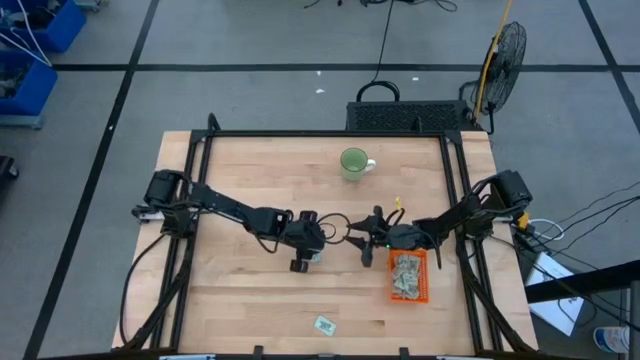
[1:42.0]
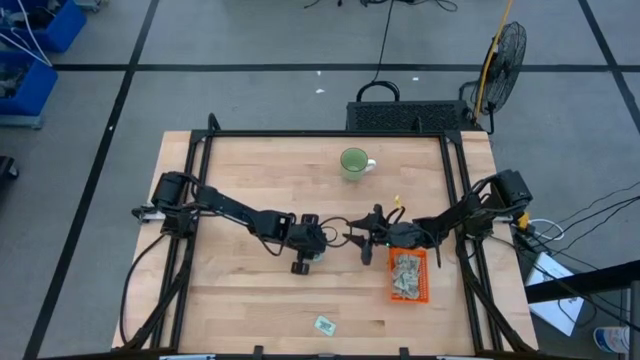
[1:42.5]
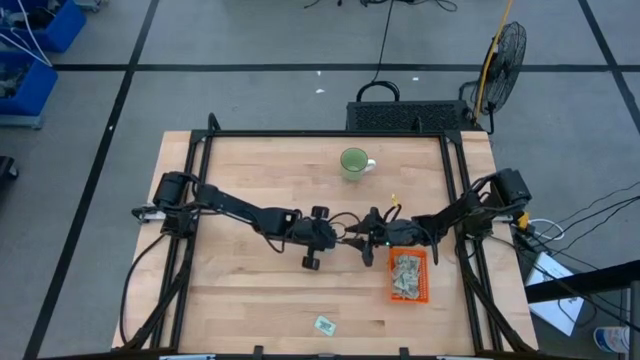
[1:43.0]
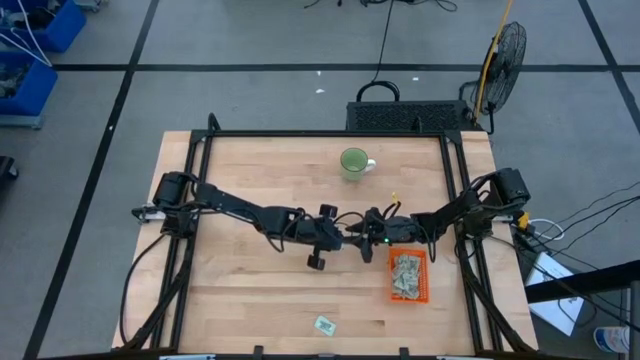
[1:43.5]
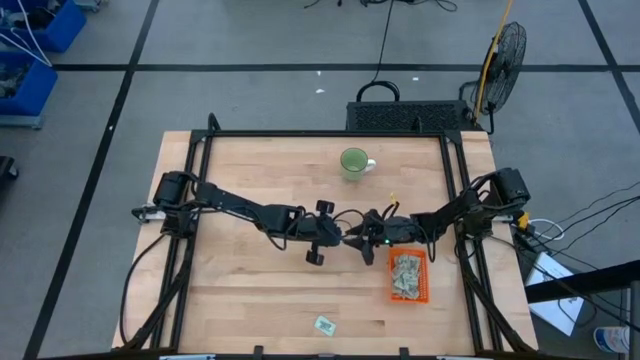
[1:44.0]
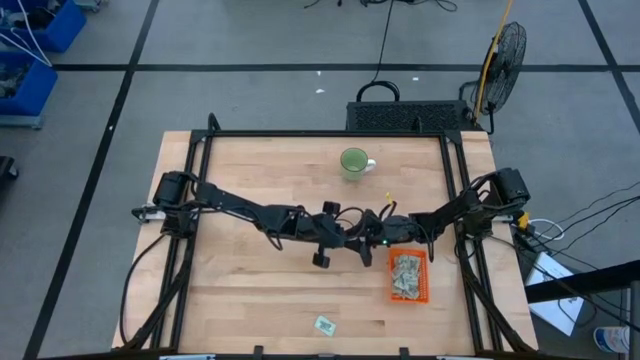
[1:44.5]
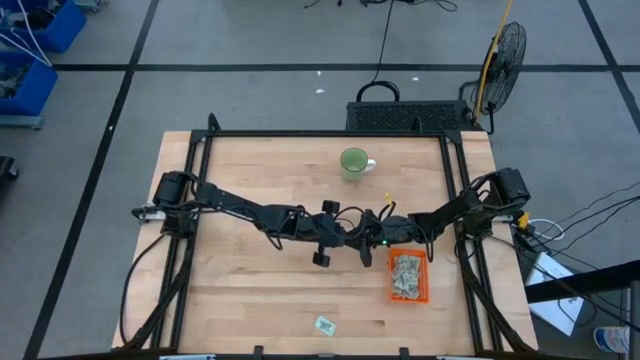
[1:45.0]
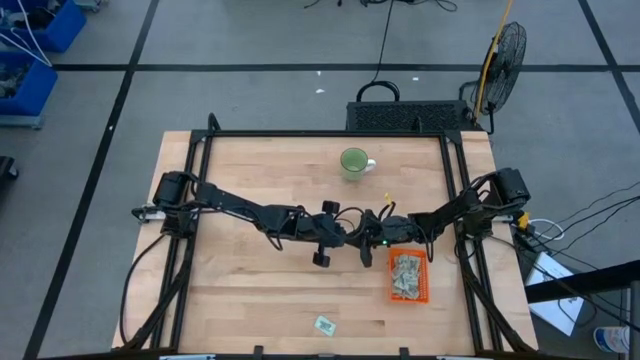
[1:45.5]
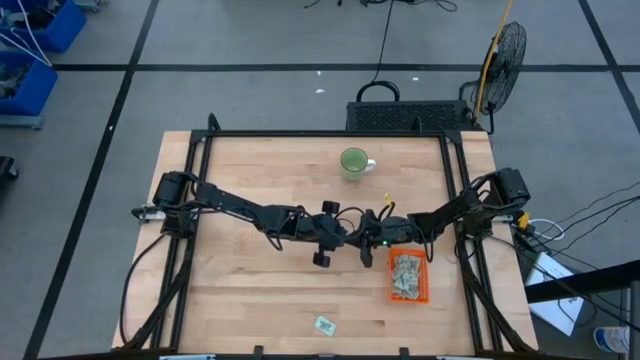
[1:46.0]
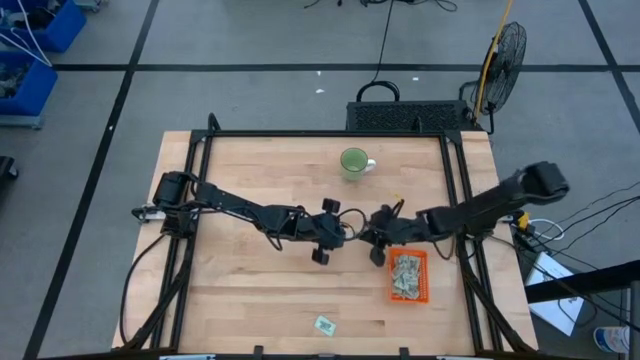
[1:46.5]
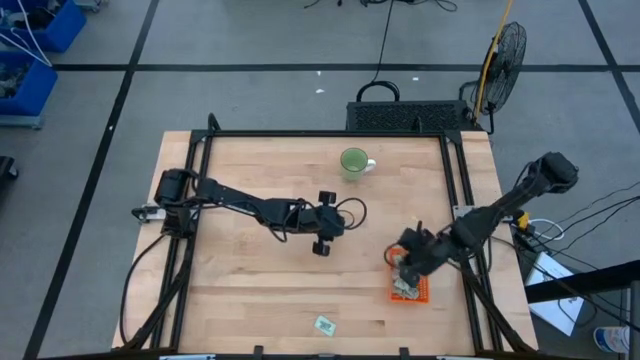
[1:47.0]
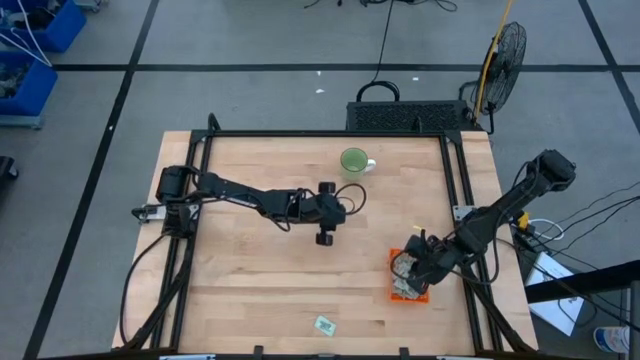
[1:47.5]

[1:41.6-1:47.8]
Task: Pick and place Stevia / Truvia into bins
Put the top stevia packet into the orange bin

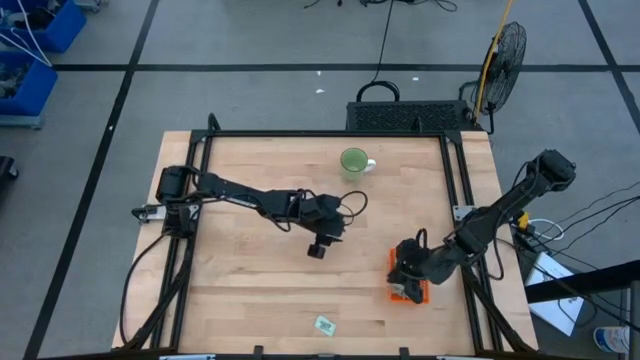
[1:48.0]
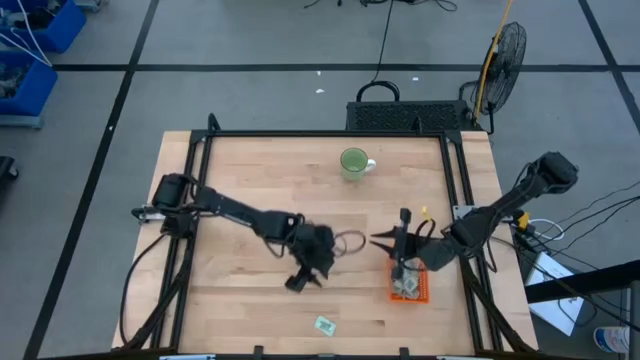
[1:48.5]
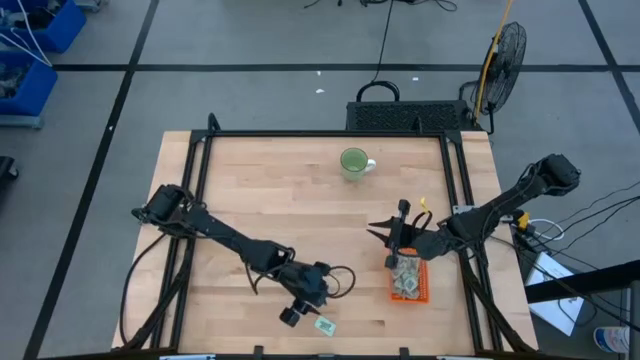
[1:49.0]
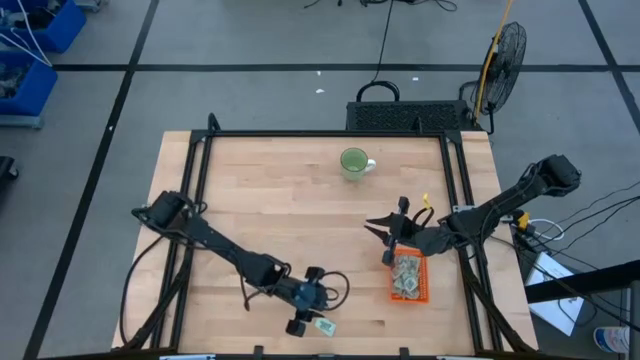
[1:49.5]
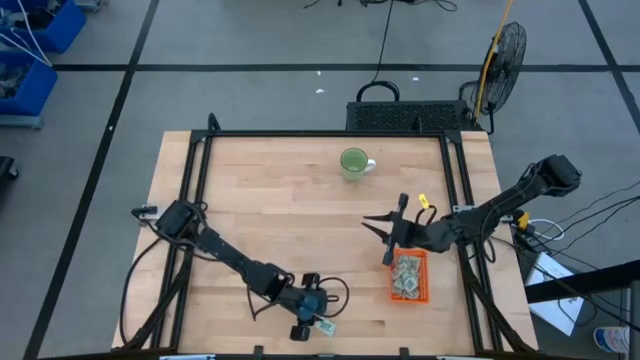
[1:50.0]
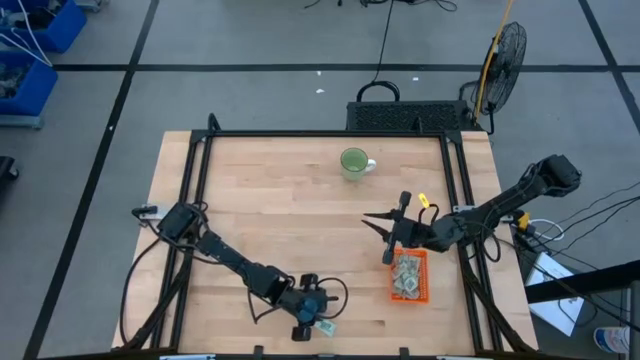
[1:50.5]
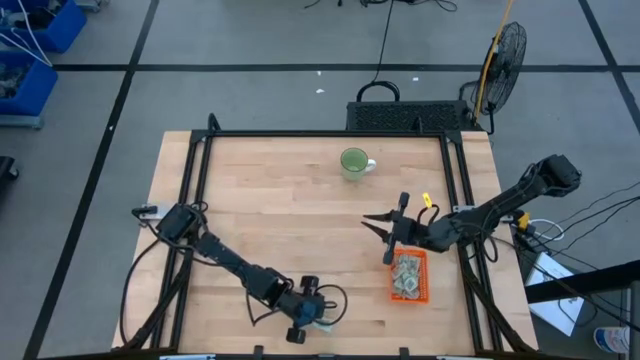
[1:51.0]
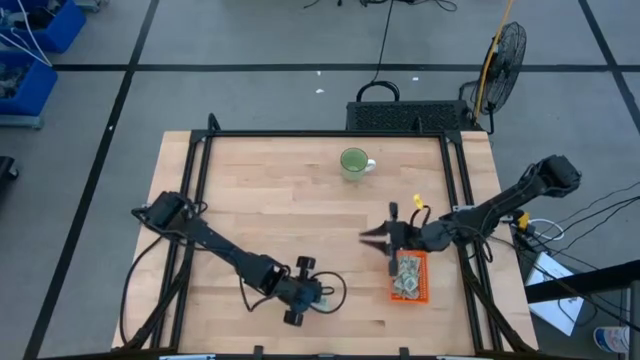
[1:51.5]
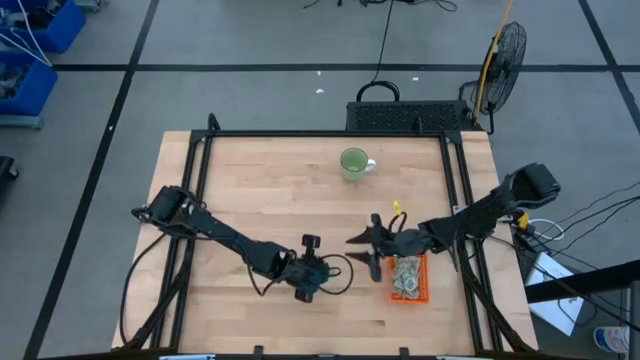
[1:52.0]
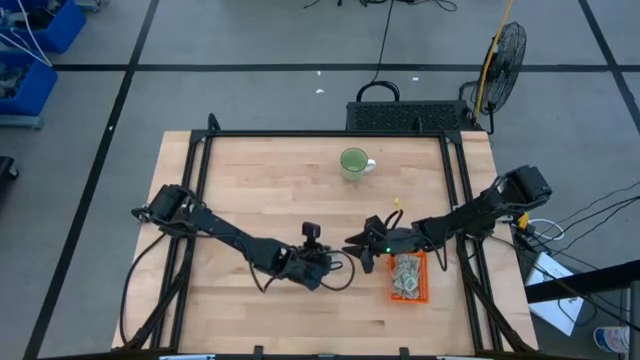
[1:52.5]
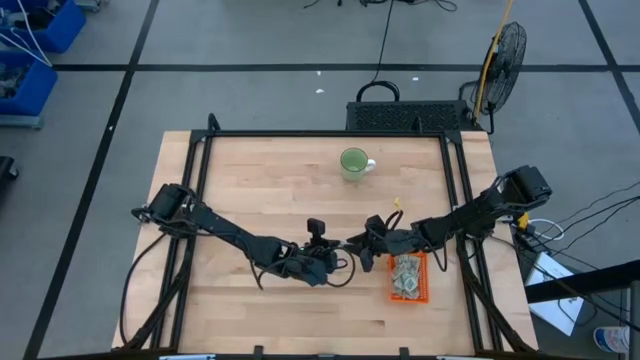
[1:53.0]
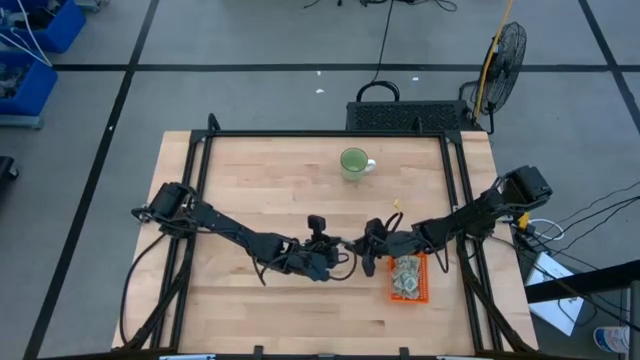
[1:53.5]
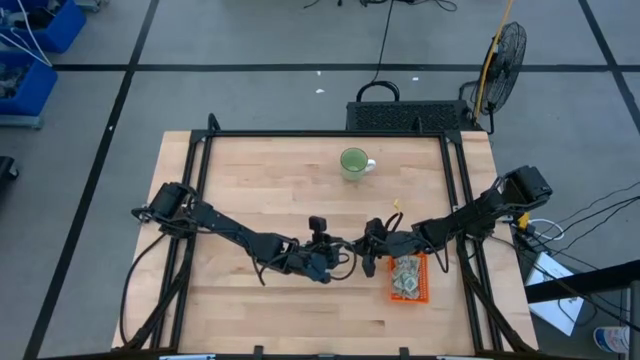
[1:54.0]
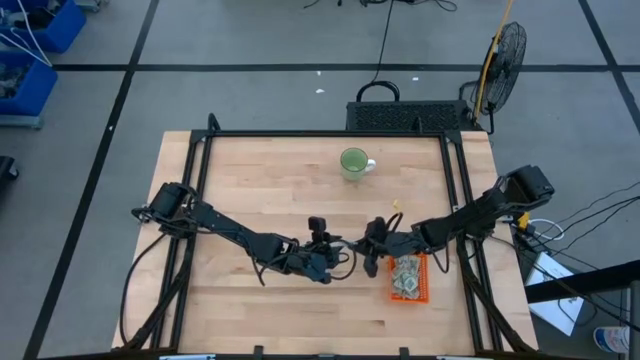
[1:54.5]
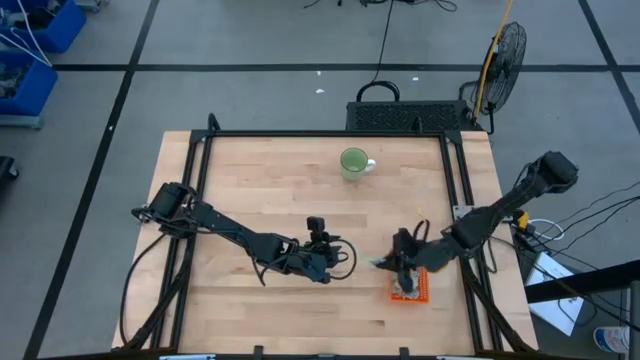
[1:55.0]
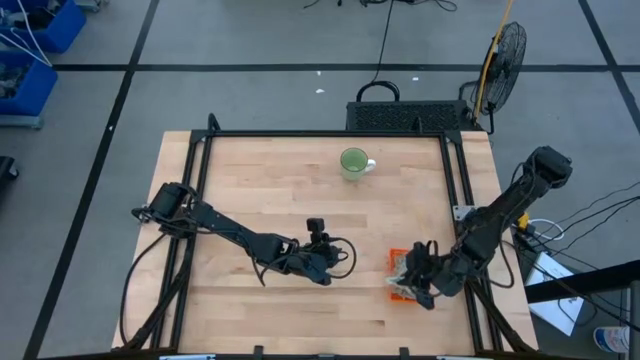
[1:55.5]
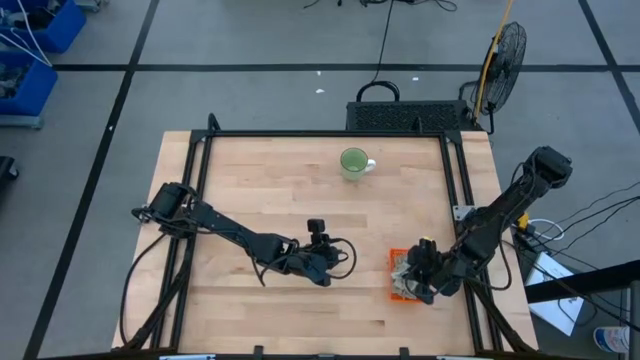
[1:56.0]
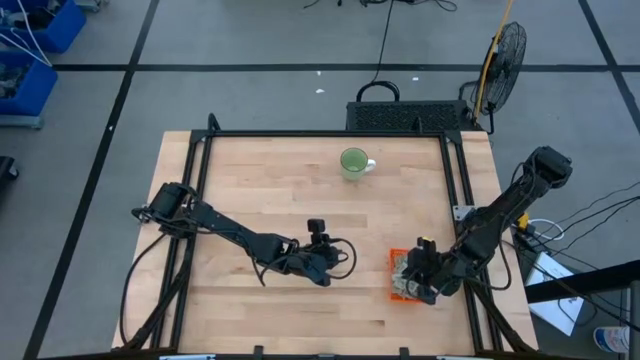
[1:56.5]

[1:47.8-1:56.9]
Put the stevia packet into the orange bin

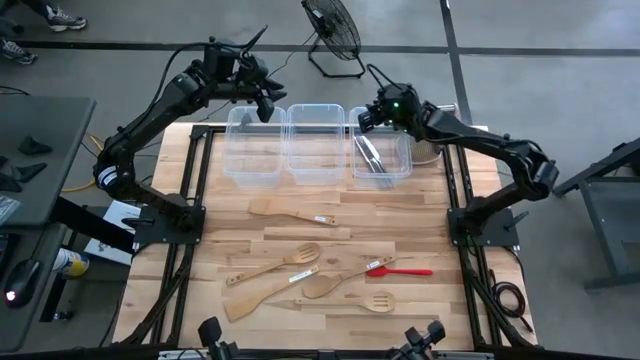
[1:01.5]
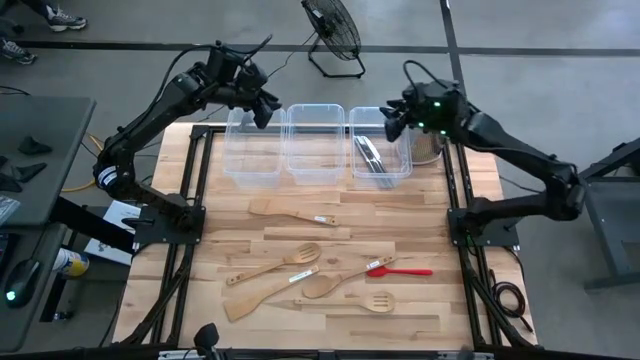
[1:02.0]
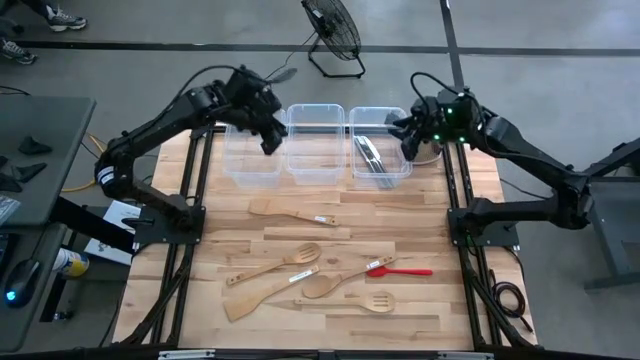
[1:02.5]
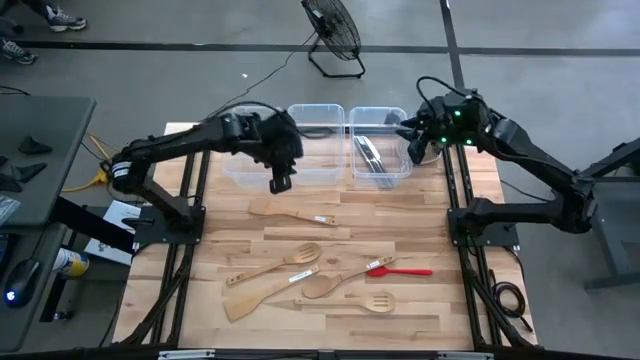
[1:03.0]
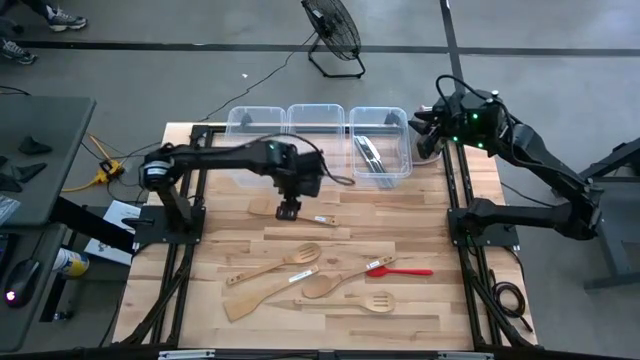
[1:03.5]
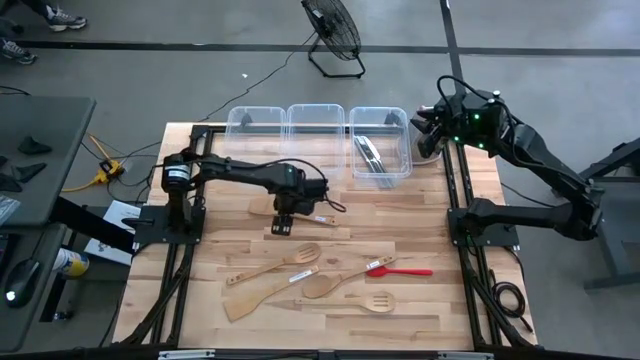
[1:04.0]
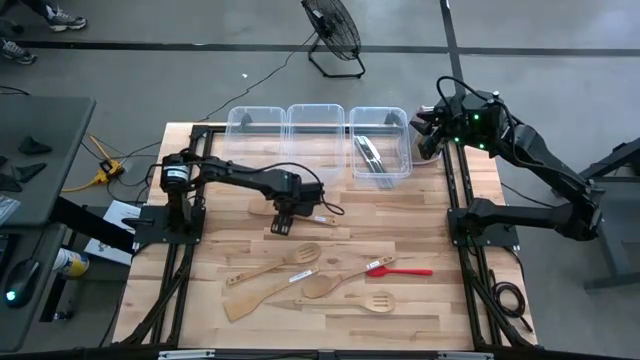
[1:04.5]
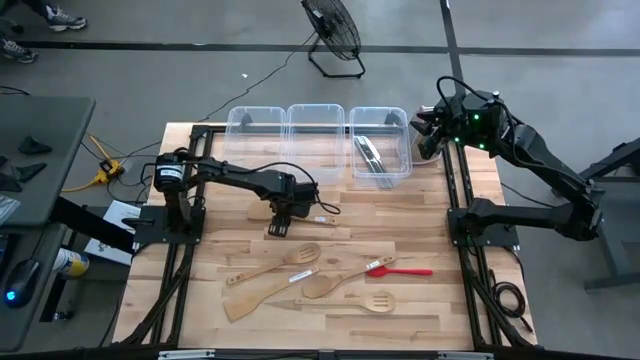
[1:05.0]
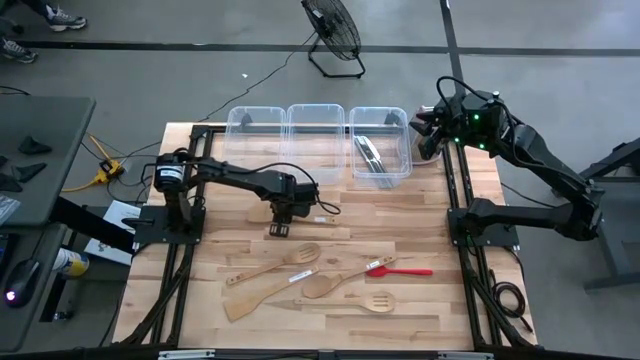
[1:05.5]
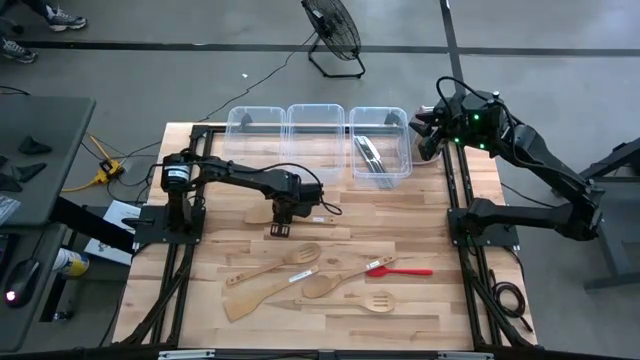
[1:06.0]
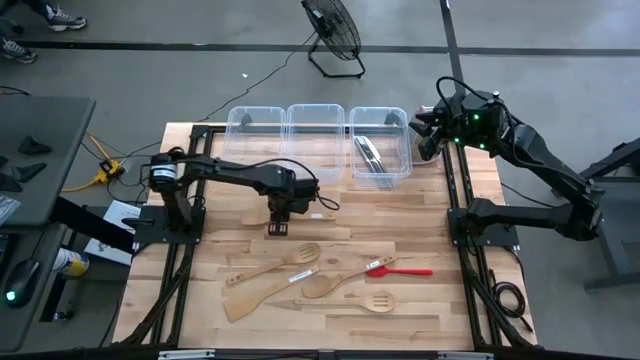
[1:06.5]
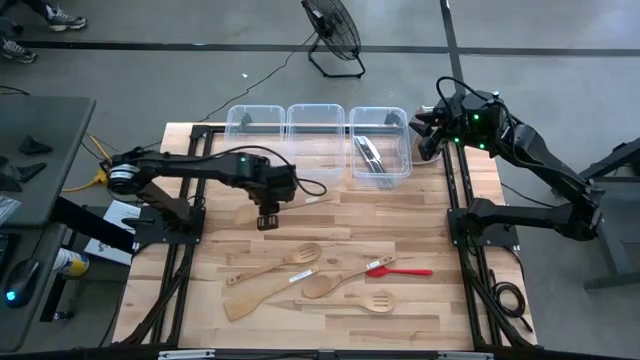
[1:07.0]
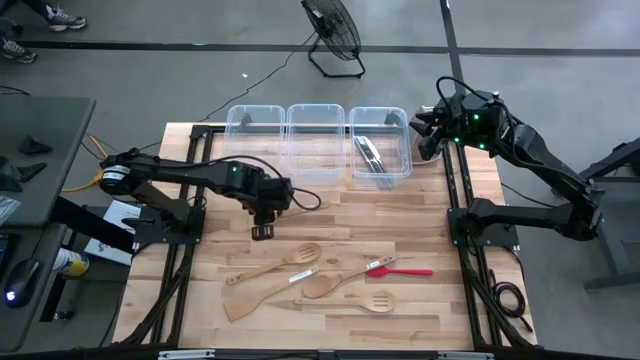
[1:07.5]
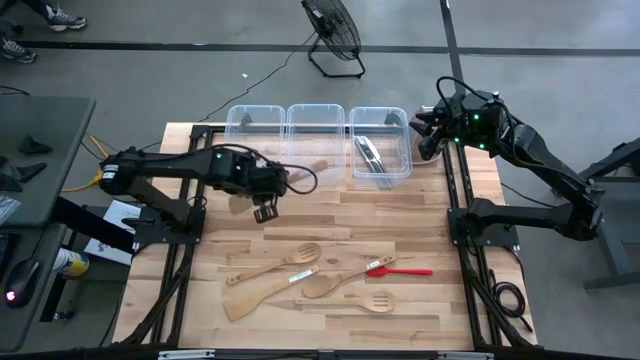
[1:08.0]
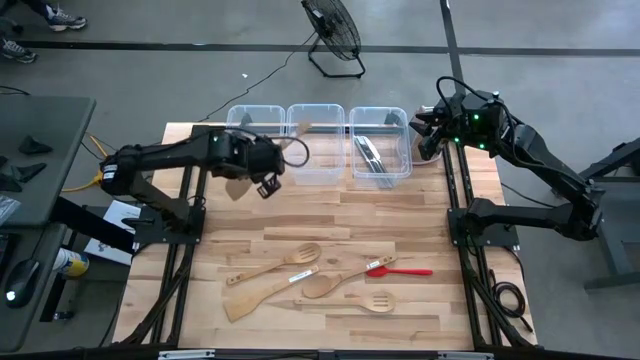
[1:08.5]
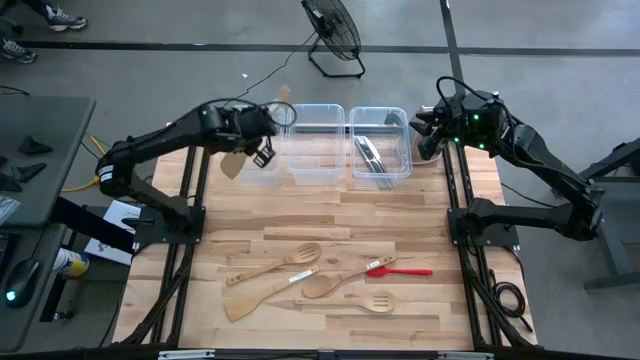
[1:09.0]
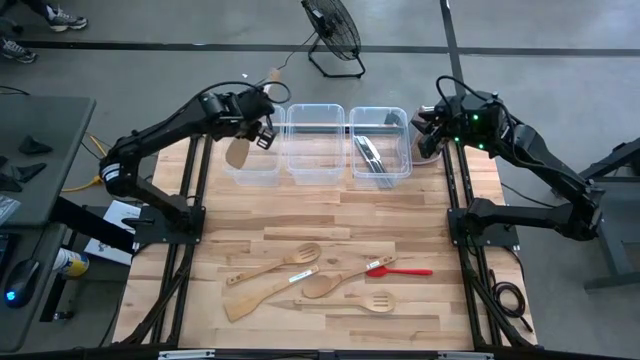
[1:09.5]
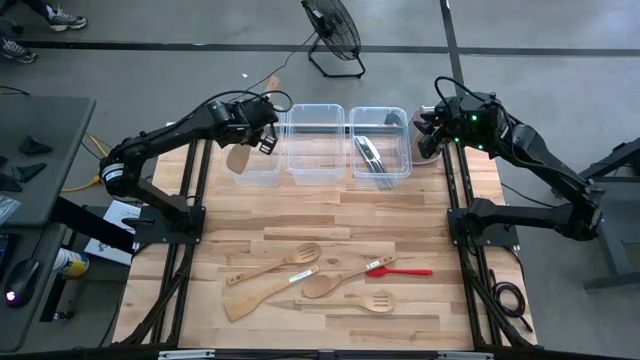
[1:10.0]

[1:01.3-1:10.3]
Task: Pick & Place Kitchen Items
Put the wooden solid turner into the left transparent bin
